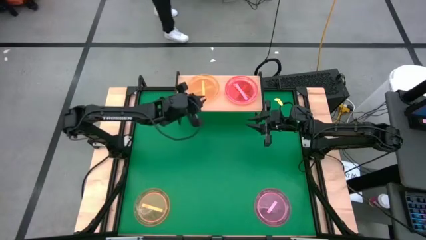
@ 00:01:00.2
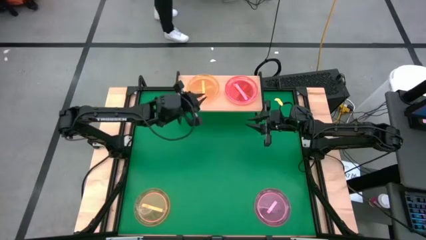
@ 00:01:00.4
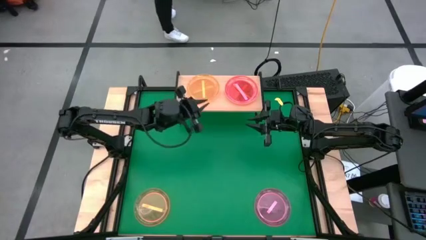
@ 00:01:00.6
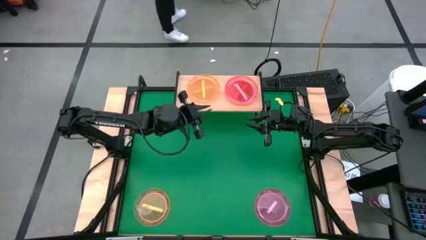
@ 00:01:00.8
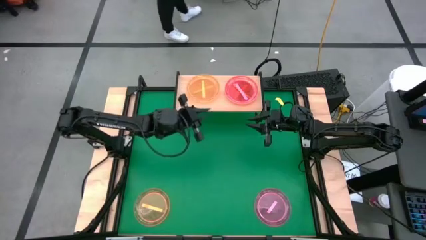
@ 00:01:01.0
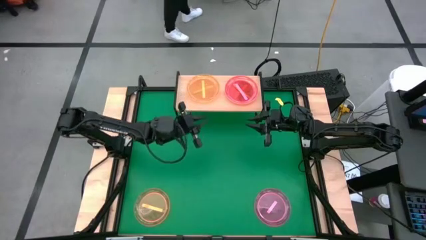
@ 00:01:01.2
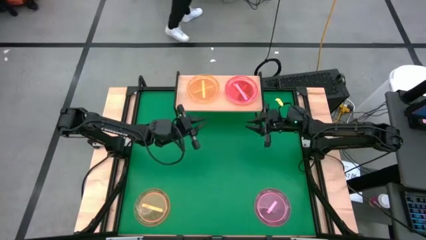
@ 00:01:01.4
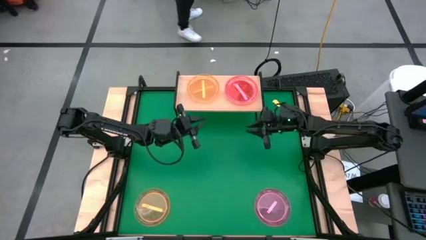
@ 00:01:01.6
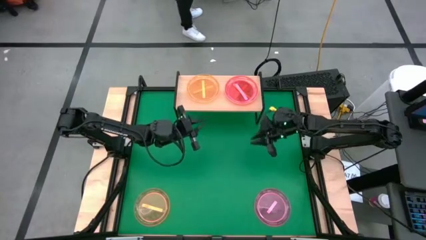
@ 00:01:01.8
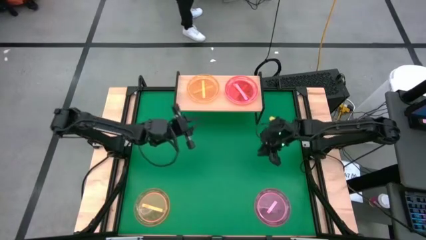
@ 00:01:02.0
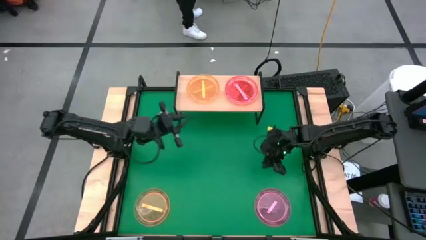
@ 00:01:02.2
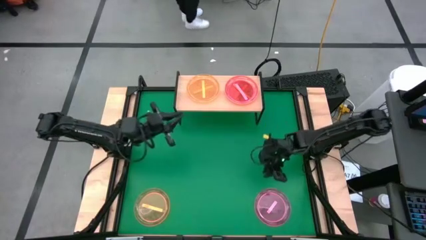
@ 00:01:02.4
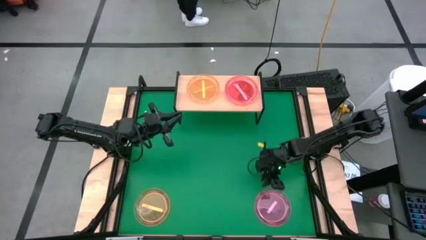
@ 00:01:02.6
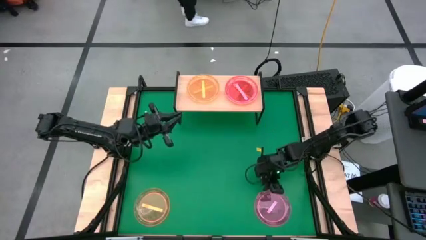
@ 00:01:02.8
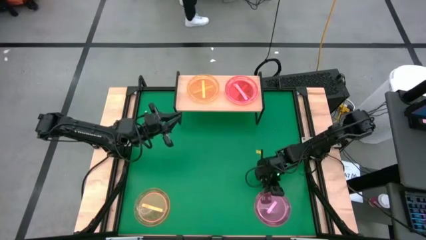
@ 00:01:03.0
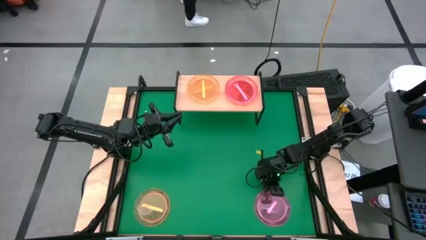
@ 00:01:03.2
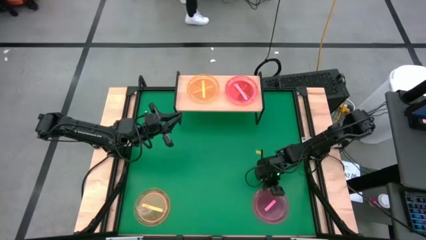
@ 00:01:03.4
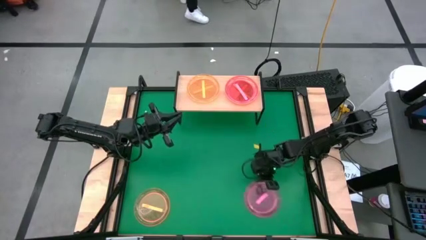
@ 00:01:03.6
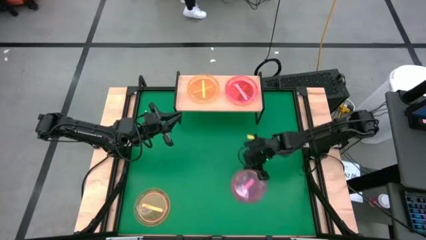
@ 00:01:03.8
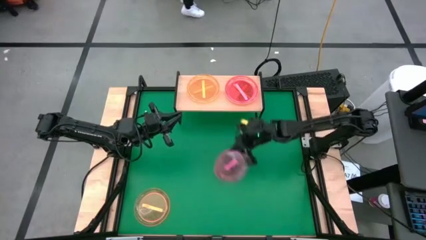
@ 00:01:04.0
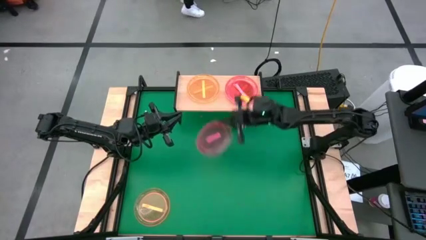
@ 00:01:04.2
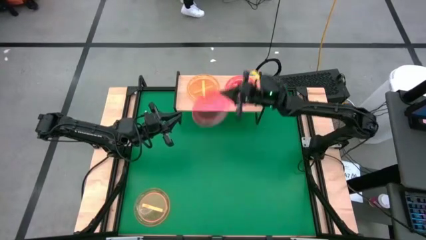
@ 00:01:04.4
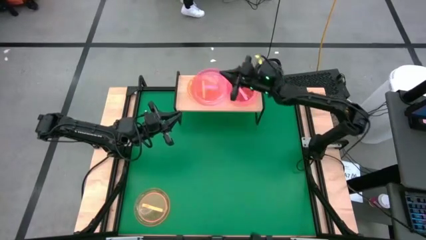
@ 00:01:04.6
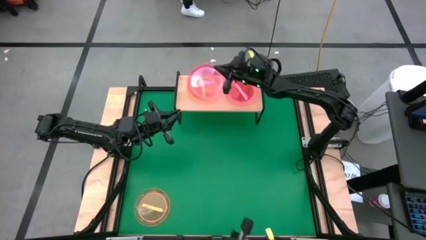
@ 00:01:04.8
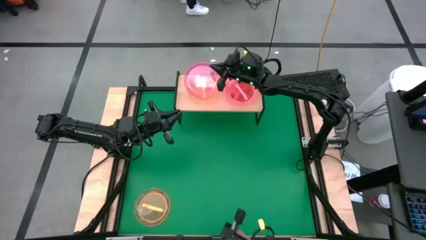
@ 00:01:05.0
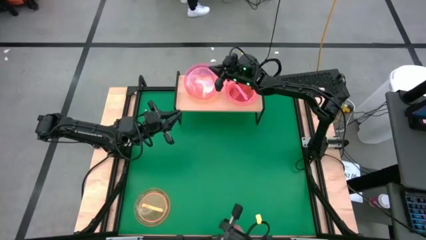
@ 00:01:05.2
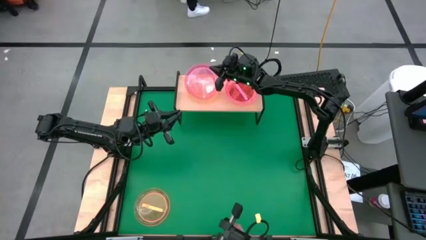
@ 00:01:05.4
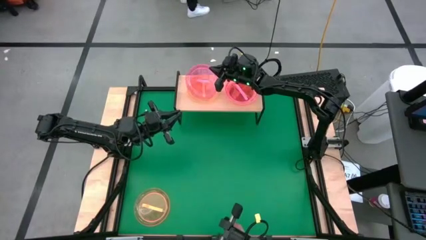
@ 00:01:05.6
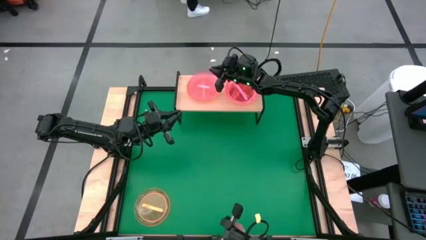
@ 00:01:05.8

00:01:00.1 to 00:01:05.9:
Task: Place and stack plates onto a shelf
Stack the pink plate on top of the orange plate on the shelf

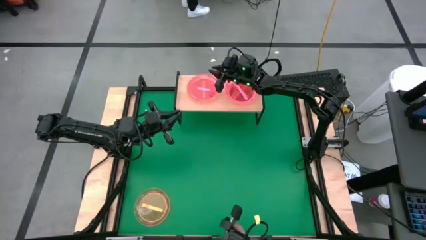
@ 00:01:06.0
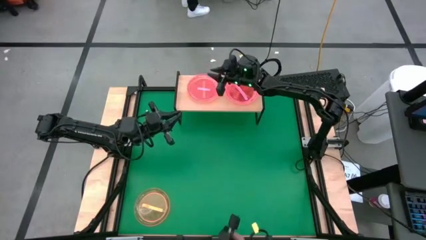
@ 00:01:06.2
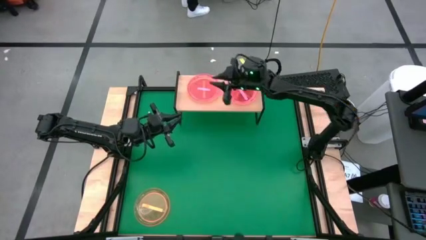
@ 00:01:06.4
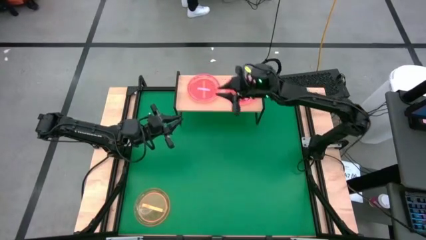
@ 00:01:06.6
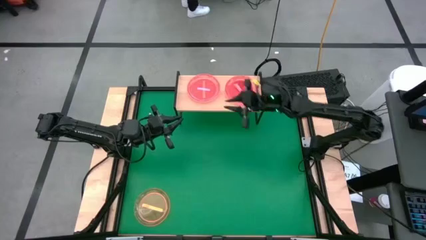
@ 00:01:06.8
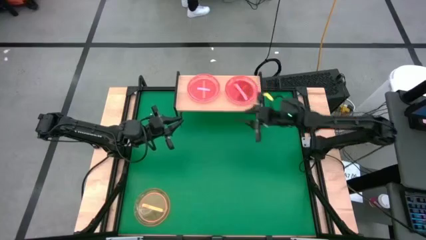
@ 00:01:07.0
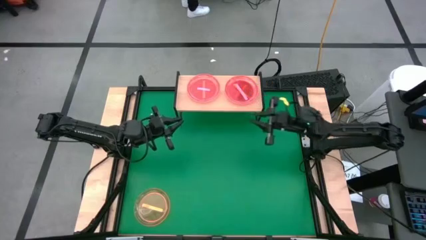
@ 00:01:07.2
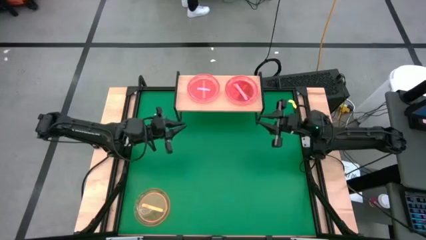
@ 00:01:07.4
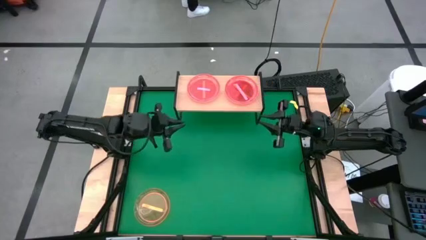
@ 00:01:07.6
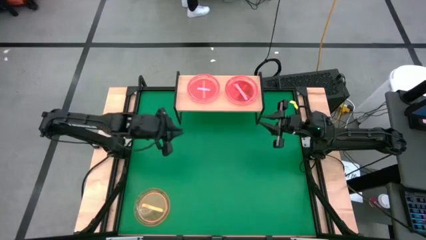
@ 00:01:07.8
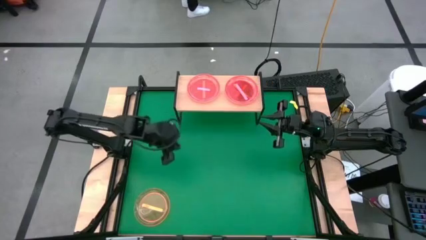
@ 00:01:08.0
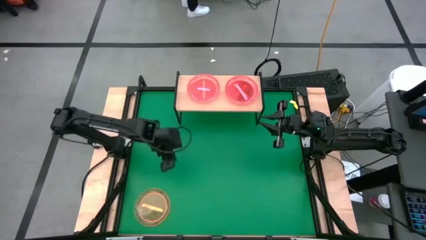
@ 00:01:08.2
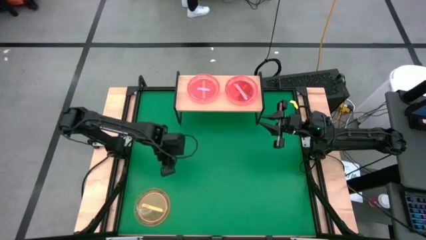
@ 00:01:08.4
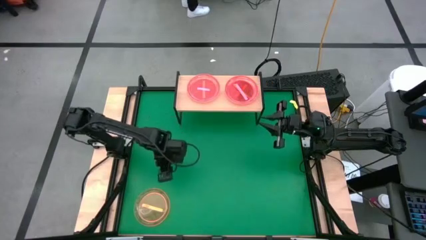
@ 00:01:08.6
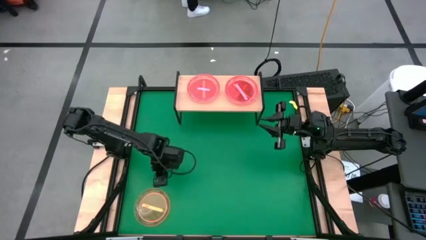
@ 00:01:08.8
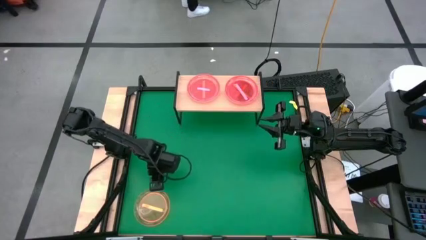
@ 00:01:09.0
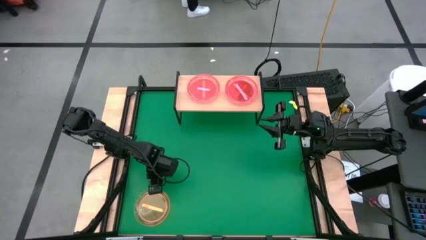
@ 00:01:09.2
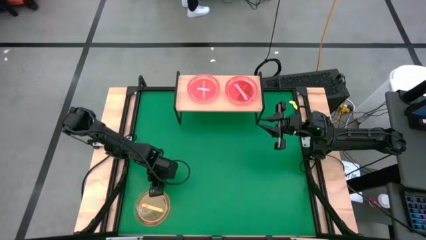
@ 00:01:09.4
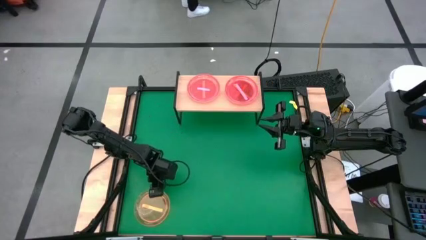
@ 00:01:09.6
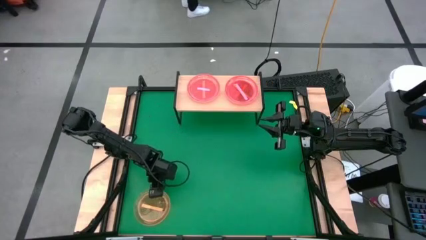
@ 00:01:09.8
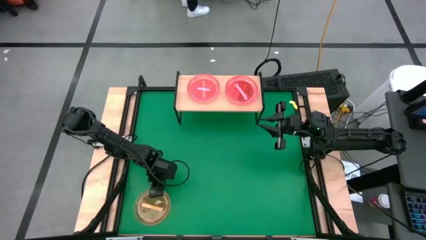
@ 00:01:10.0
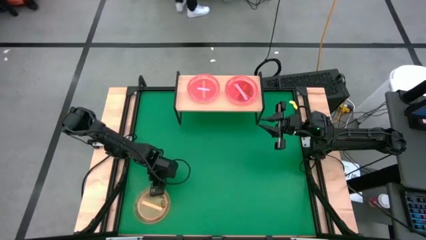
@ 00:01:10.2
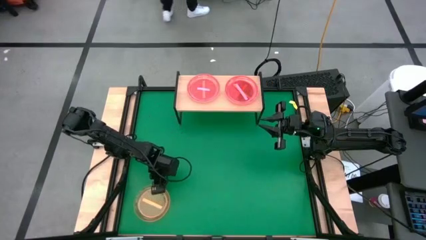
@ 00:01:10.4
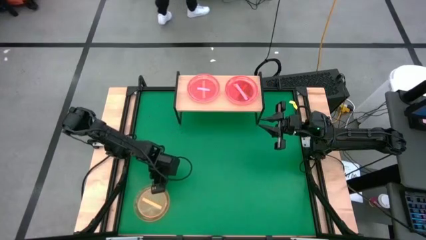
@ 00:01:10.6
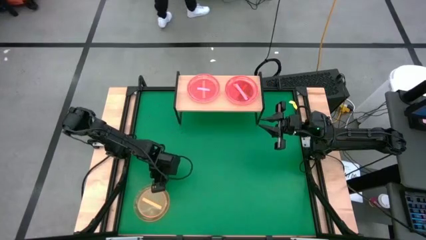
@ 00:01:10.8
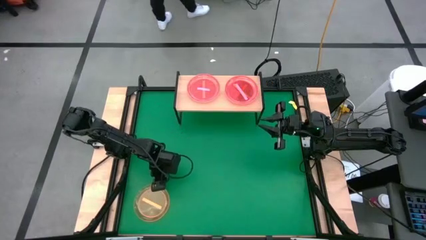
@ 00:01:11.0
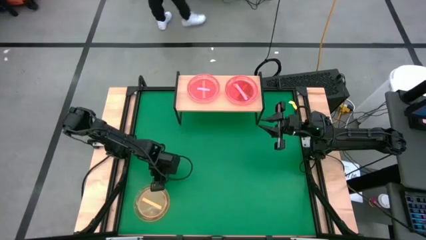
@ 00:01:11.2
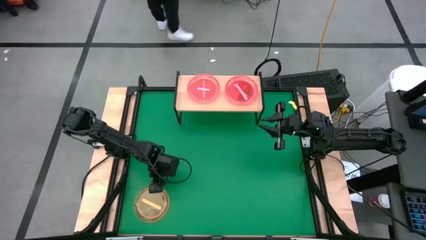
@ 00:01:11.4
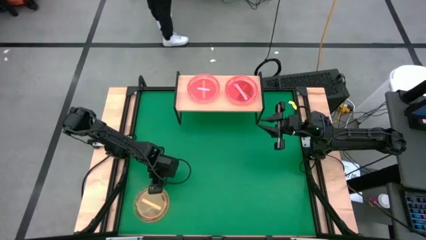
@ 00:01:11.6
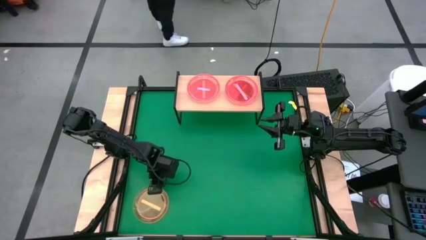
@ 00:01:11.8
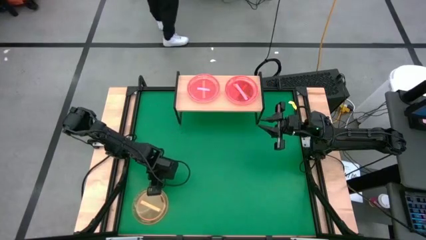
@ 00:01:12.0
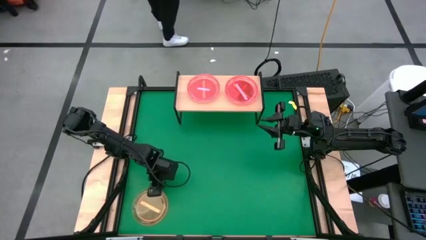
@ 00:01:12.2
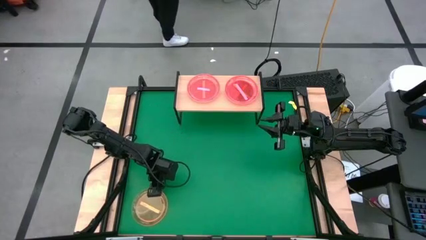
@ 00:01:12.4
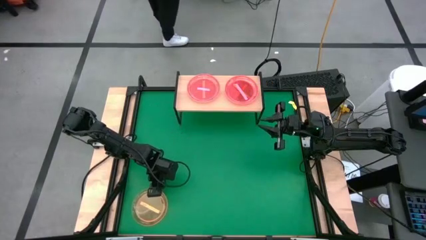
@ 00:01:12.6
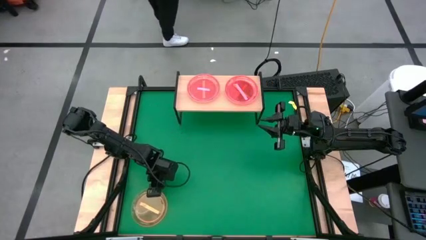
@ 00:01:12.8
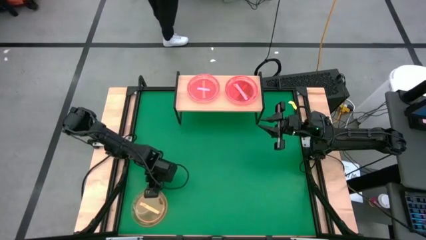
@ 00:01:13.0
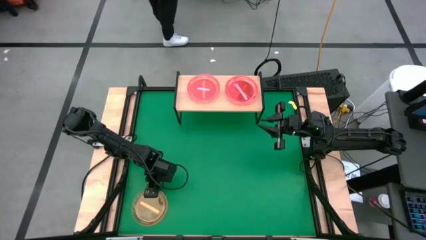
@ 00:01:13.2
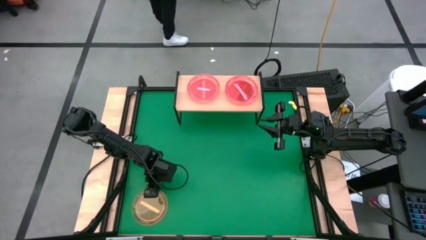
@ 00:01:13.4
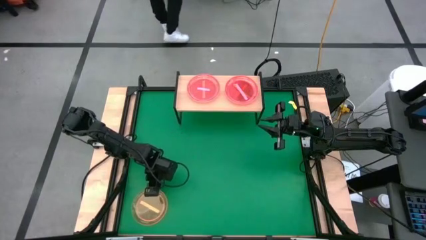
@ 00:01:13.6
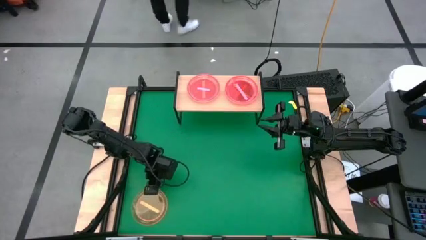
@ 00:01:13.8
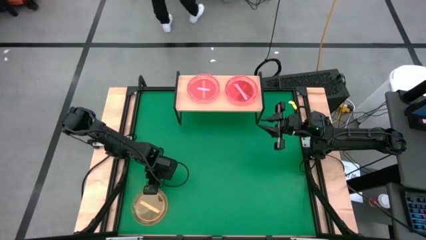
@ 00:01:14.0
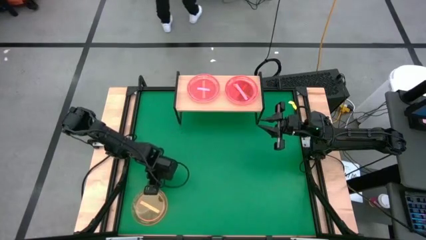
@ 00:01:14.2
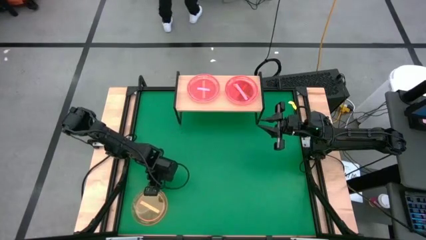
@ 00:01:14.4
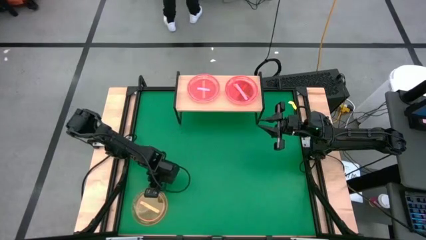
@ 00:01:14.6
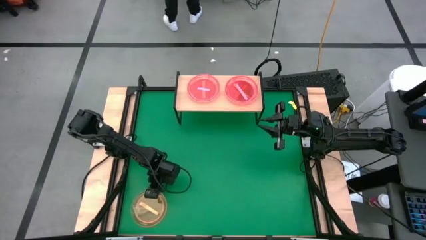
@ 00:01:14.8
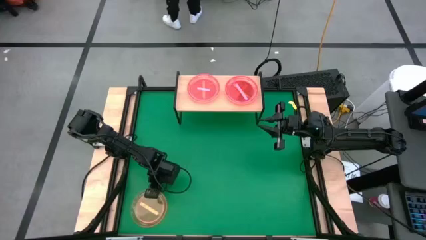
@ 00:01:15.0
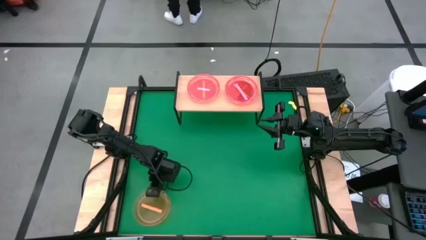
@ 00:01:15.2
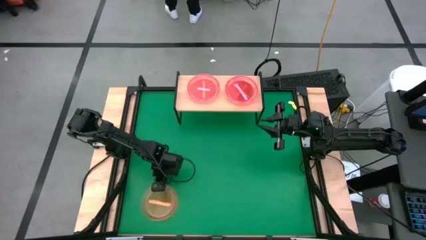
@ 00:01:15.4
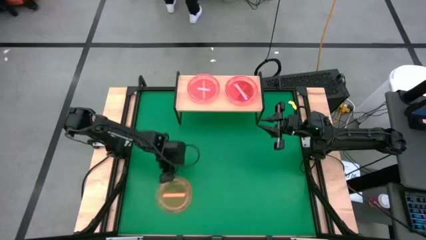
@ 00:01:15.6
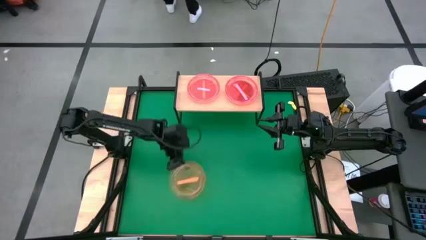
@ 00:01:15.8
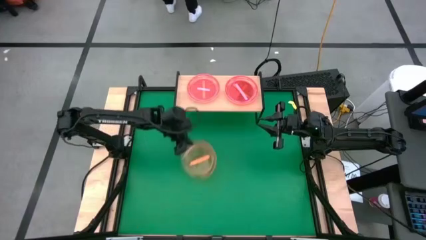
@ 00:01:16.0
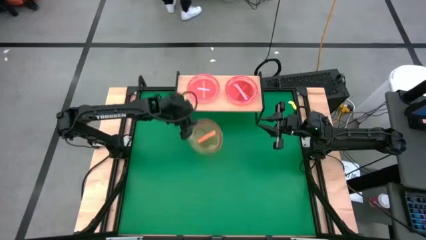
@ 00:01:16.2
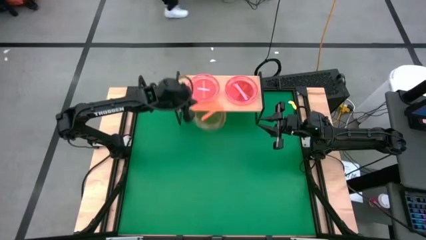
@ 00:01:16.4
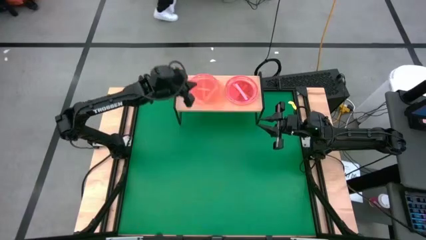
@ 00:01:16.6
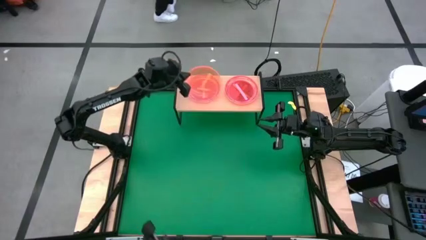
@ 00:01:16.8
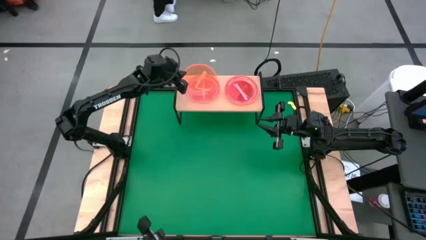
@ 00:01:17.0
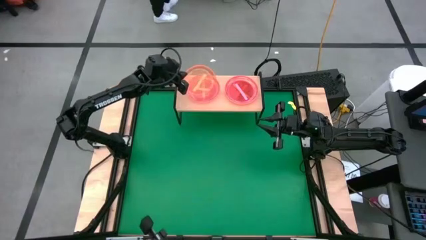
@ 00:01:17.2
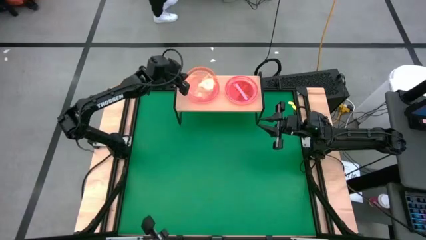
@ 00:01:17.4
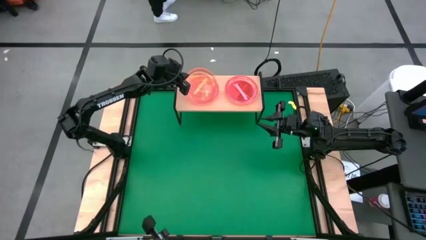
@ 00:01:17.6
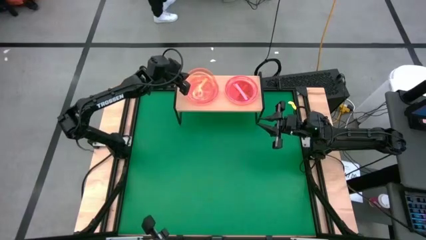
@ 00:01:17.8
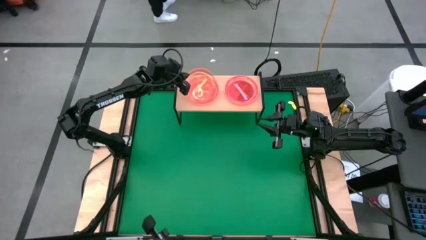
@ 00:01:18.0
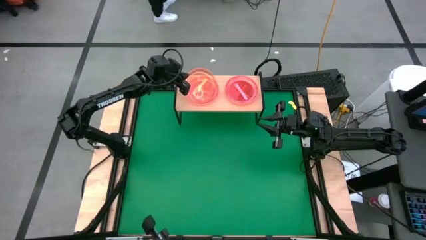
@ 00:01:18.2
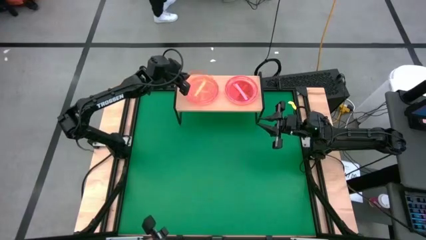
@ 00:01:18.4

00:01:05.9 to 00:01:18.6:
Stack the orange plate on top of the pink plate on the shelf
